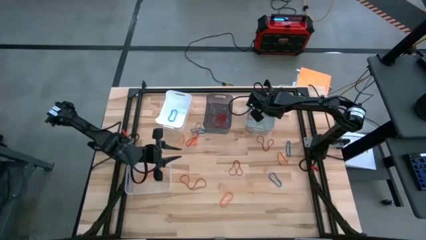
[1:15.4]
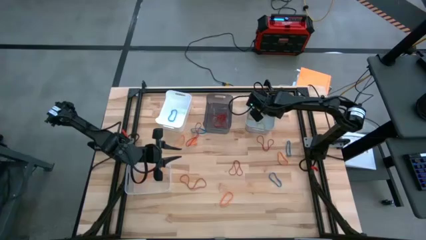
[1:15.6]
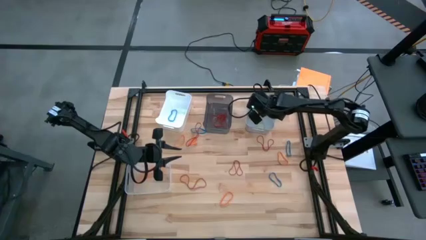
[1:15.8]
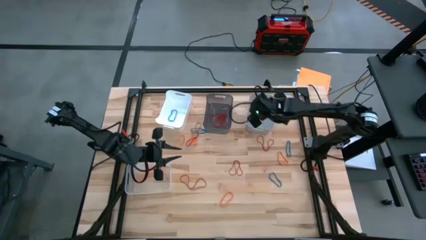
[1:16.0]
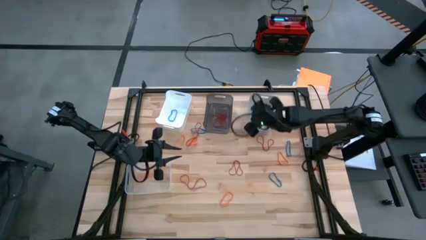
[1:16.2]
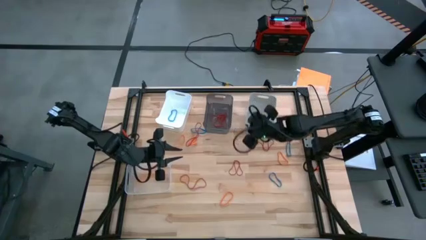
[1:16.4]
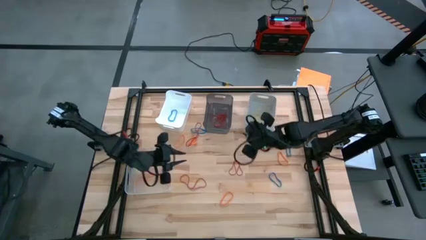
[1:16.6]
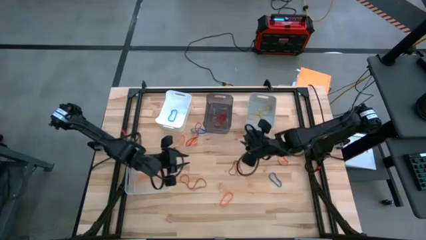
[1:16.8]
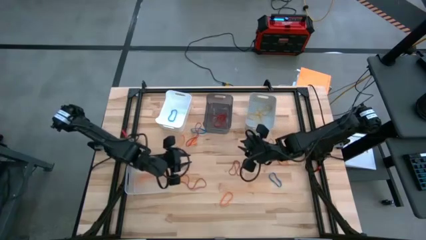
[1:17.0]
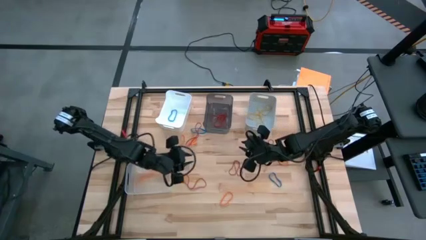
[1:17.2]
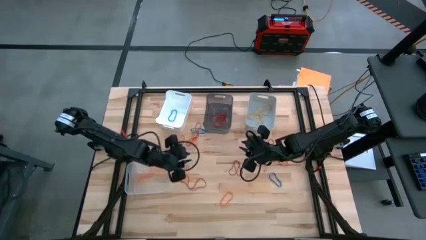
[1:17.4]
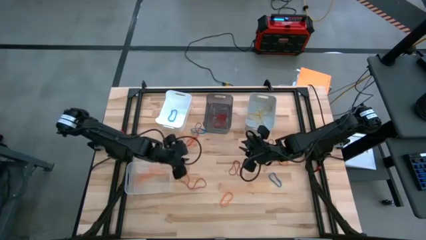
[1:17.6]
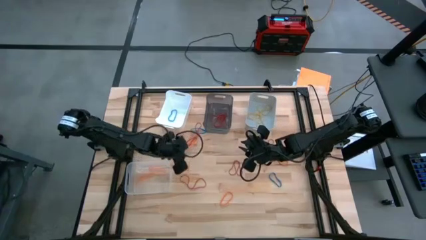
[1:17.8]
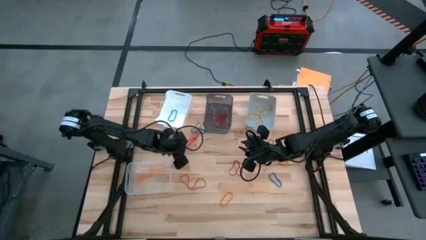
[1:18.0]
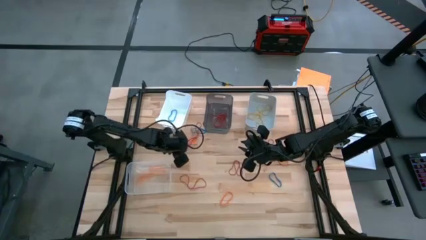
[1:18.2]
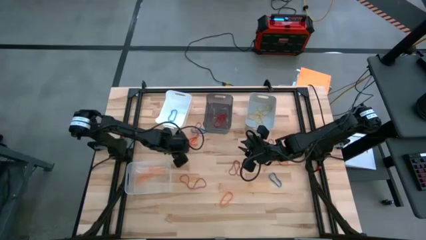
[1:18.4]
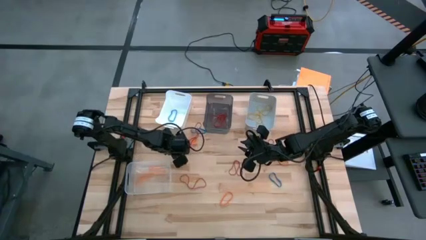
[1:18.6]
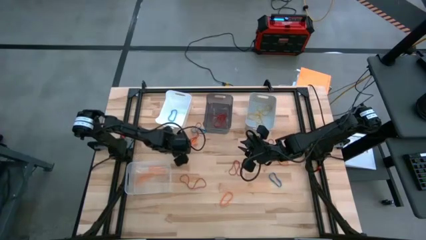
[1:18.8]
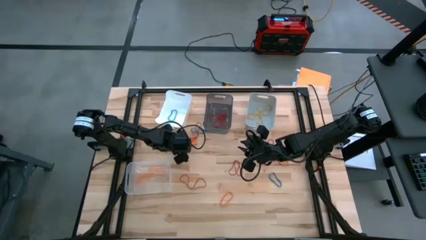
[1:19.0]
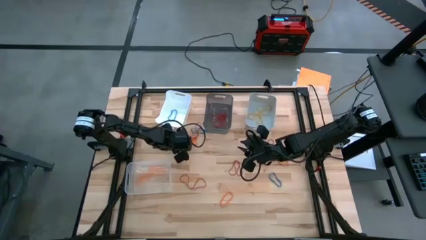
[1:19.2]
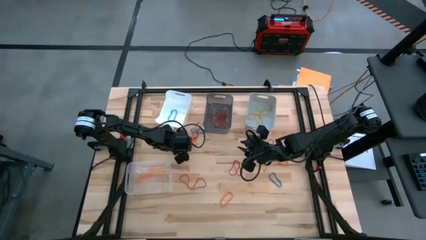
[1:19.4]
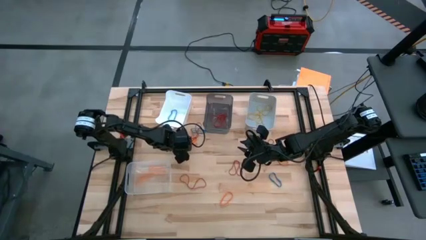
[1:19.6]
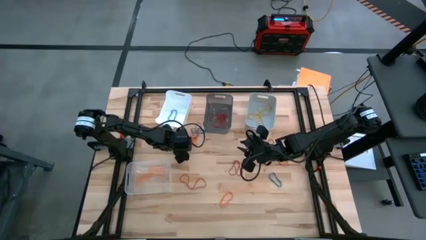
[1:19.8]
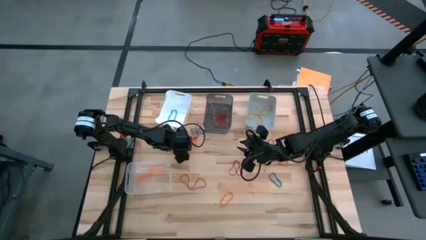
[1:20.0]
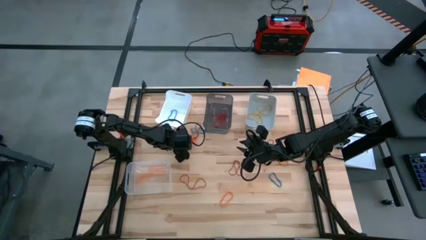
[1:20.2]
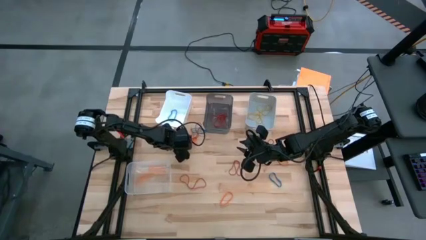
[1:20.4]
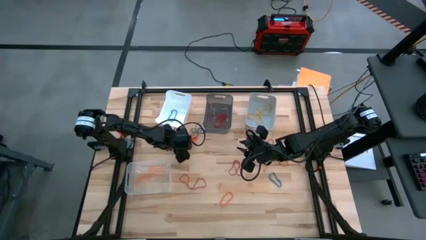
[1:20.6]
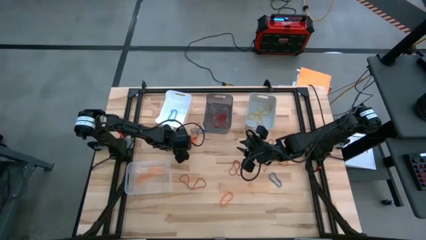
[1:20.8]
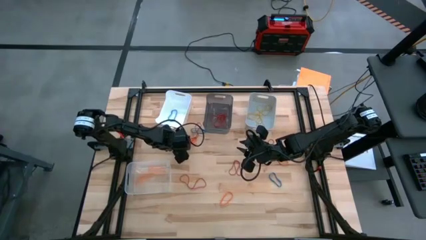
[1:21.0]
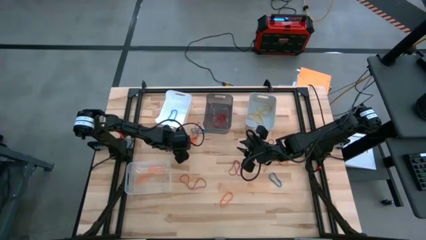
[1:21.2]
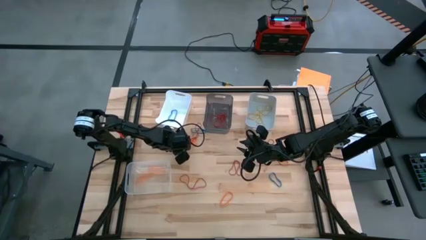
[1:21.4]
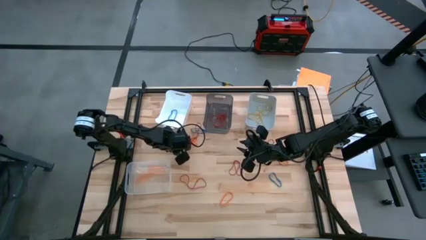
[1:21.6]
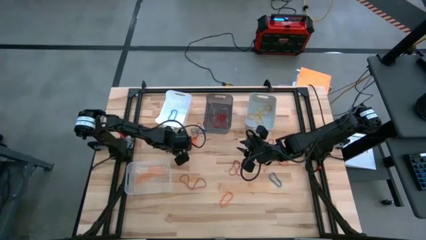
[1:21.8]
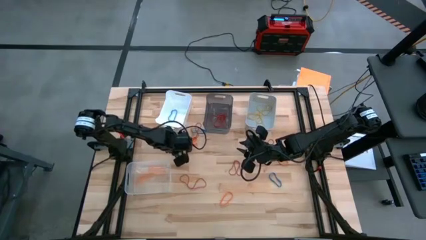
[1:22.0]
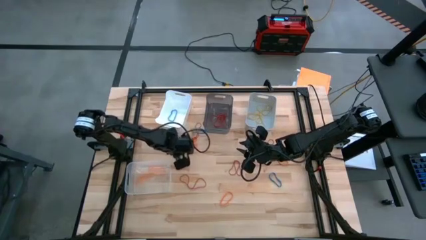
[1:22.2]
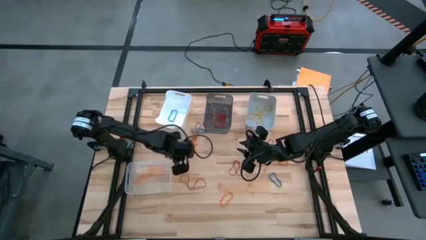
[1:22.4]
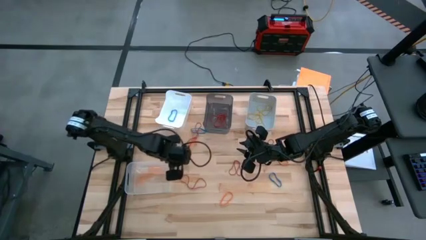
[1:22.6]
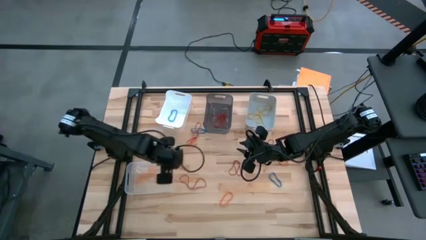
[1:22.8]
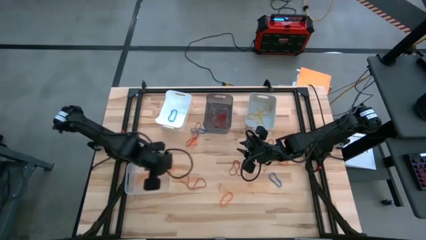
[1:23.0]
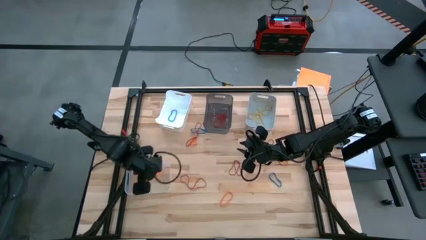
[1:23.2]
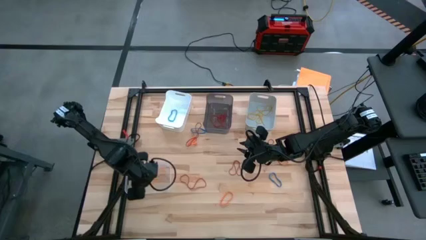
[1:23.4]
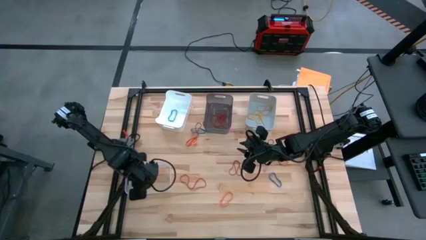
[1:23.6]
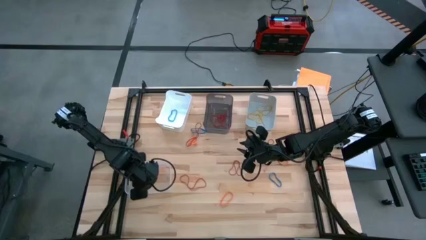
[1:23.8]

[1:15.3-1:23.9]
Task: Sort rubber bands into baskets
Put the orange rubber band into the transparent bin

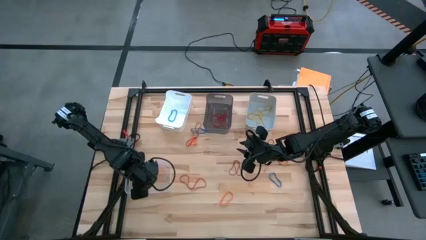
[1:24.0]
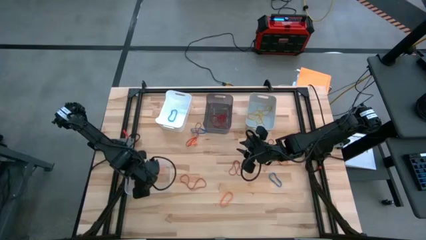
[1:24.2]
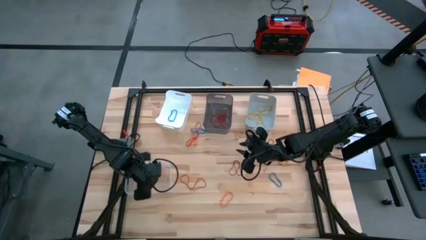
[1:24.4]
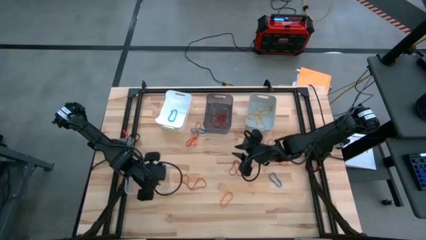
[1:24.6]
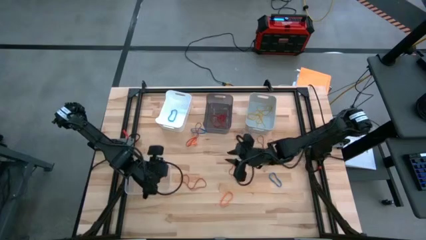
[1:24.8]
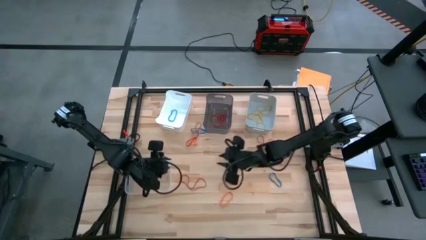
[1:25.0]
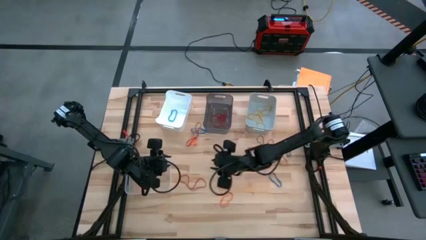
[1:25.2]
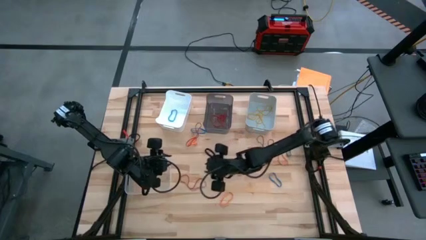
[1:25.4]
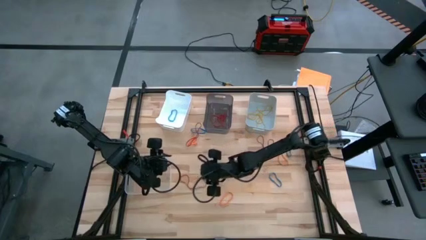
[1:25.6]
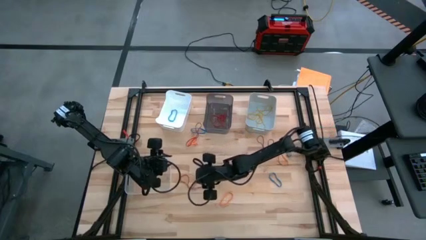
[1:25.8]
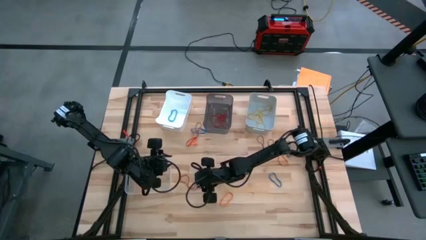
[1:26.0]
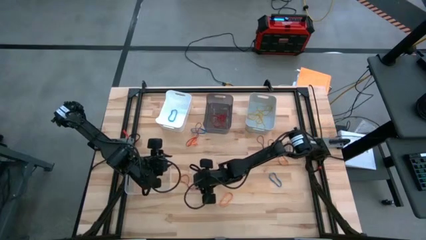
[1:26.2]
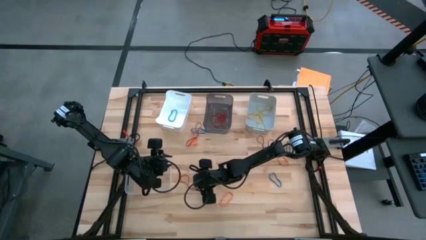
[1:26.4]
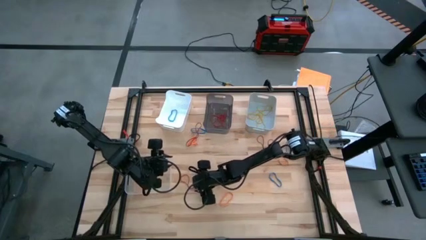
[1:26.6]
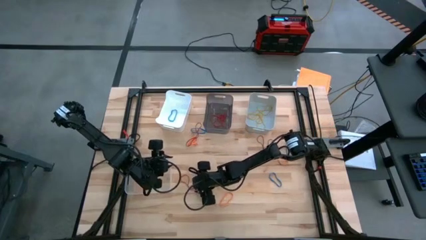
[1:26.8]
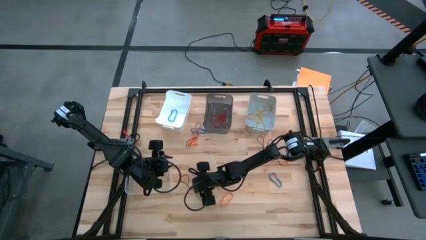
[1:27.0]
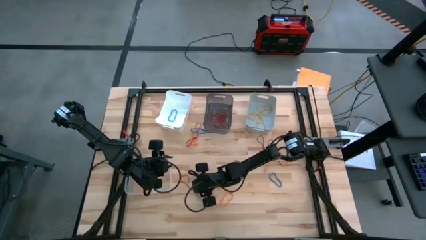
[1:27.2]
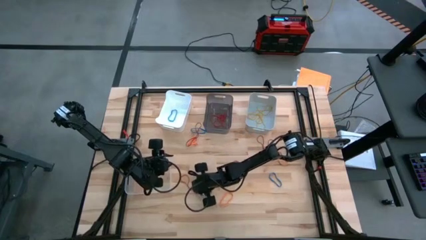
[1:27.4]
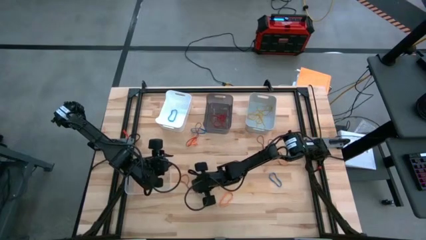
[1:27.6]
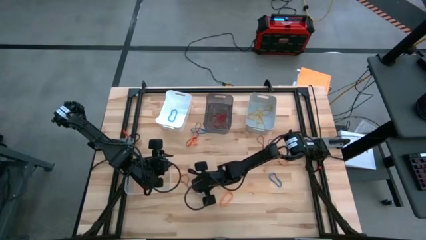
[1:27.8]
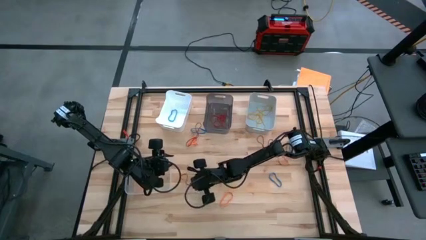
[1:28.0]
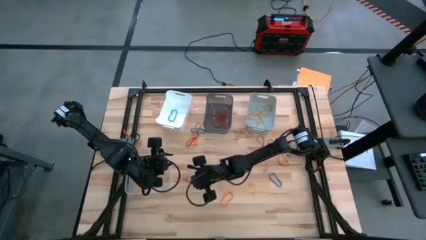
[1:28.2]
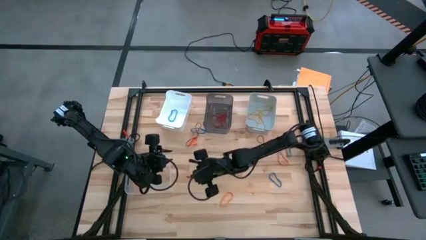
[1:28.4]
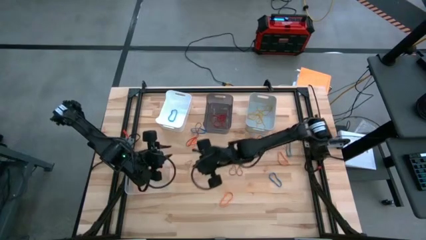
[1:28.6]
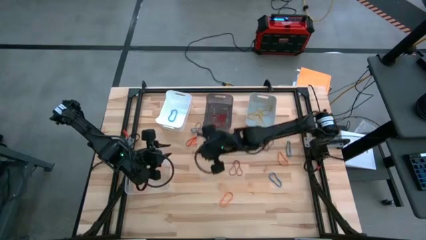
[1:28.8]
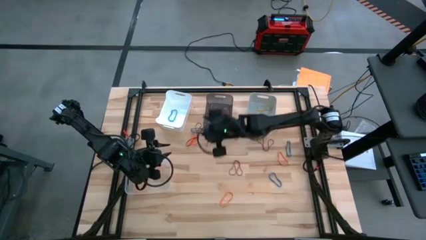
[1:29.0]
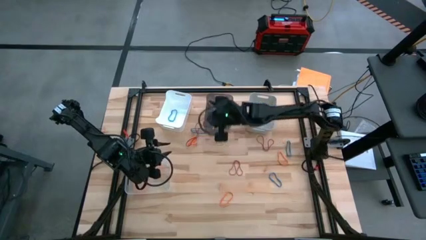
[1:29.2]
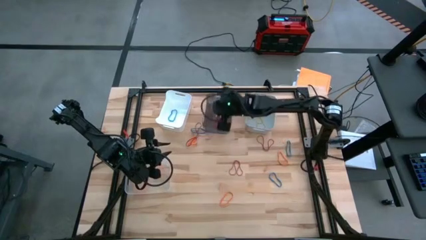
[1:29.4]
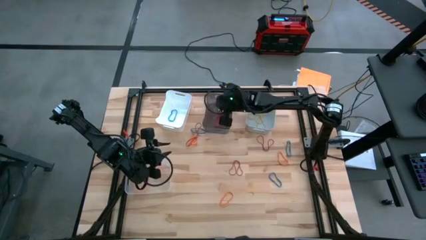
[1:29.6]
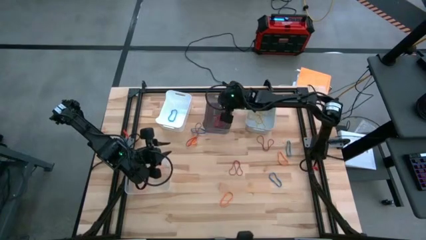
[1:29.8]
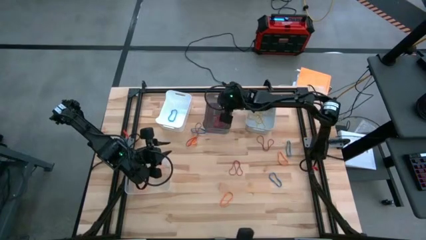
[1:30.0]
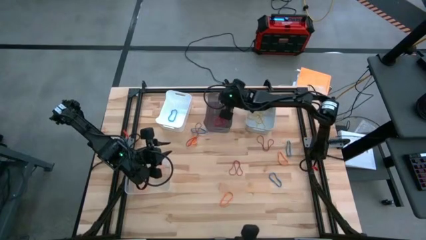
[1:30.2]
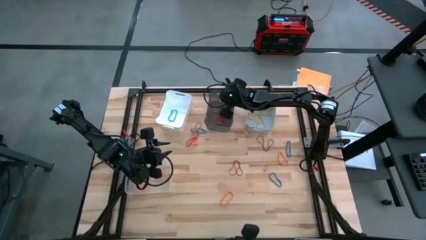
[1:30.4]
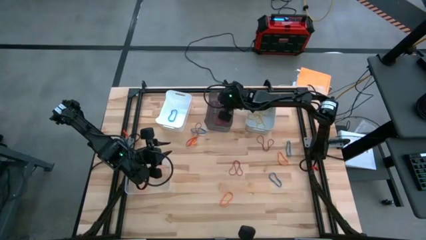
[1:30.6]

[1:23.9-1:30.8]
Put the red rubber band into the black bin

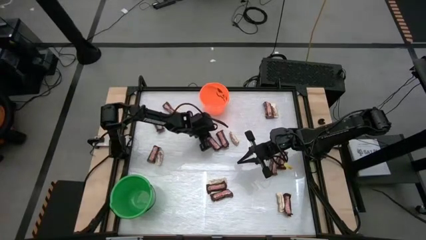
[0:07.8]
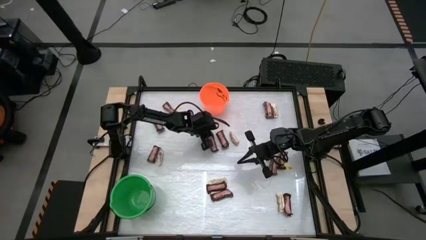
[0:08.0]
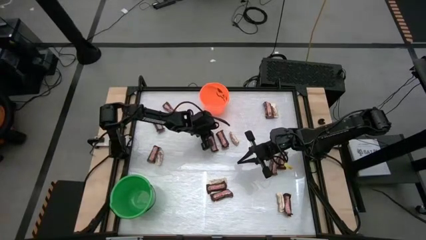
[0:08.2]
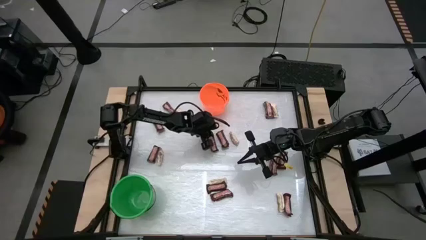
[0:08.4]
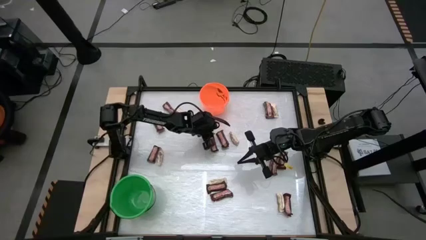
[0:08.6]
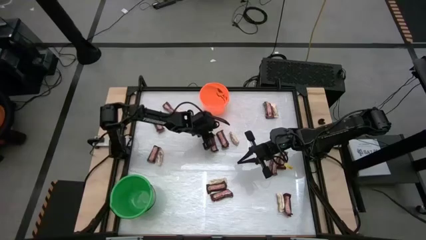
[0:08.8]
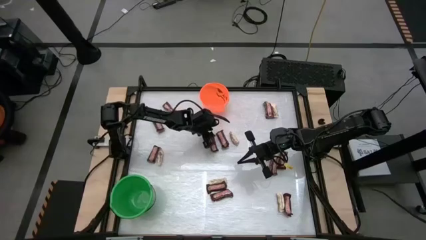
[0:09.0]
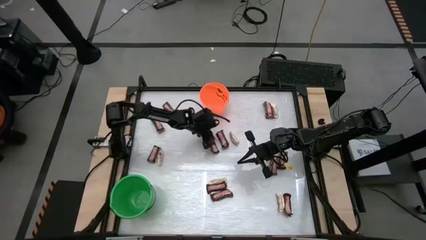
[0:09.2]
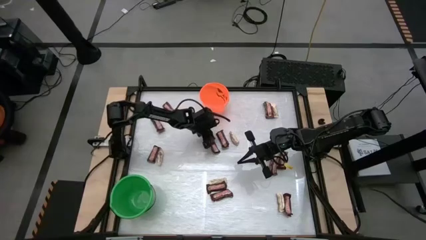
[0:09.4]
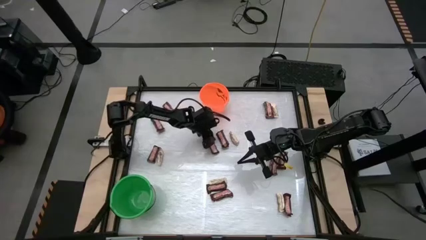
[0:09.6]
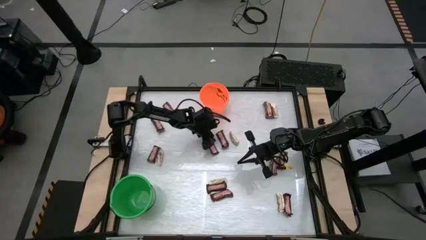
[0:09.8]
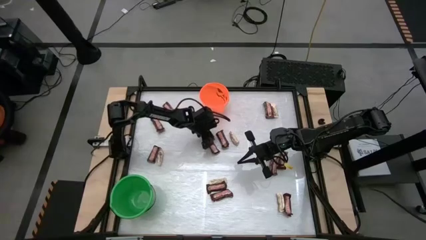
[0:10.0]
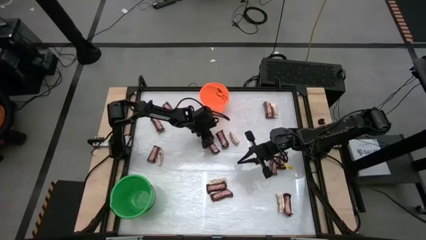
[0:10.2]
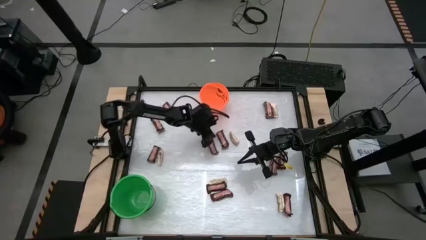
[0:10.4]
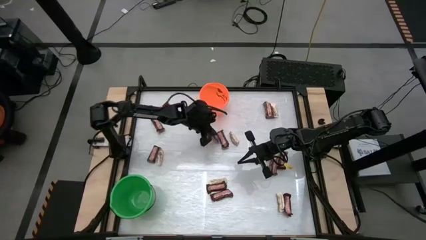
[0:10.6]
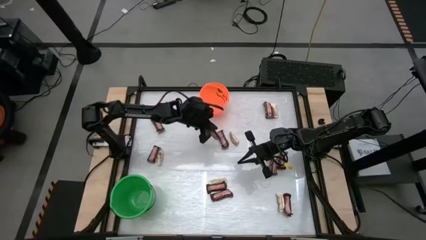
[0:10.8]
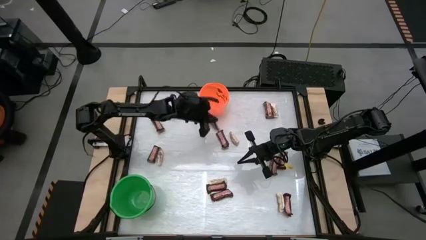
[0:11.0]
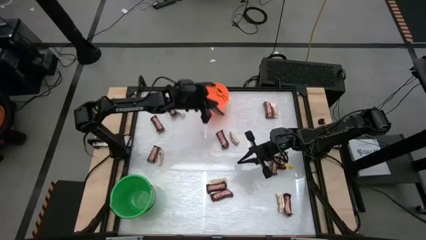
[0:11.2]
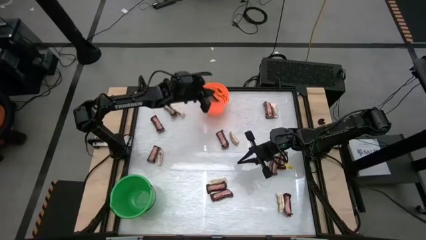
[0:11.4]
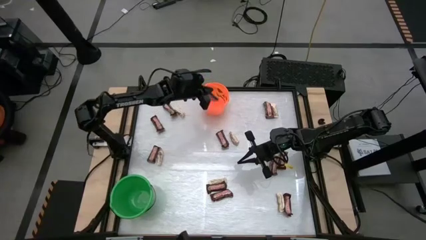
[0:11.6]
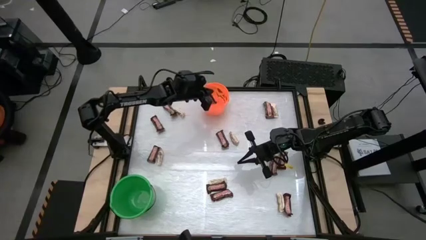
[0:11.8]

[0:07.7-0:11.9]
Task: Sort candy by brand, put in halloween buckets
Put the brown chocolate bar into the orange bucket
